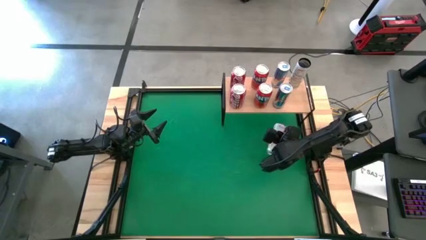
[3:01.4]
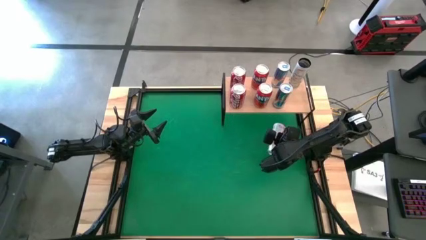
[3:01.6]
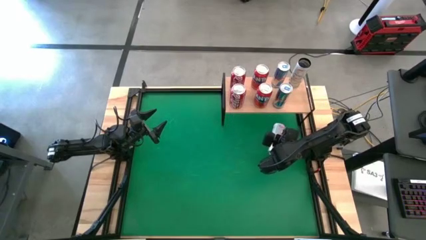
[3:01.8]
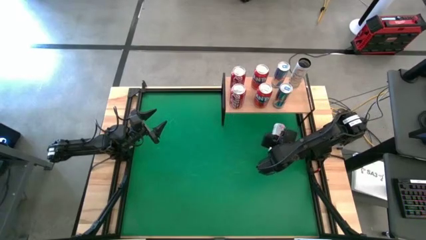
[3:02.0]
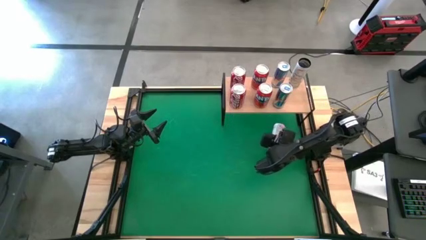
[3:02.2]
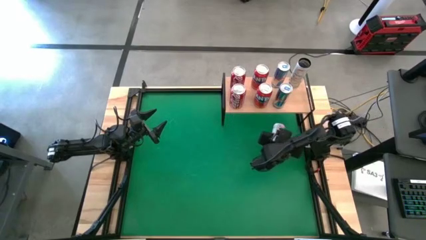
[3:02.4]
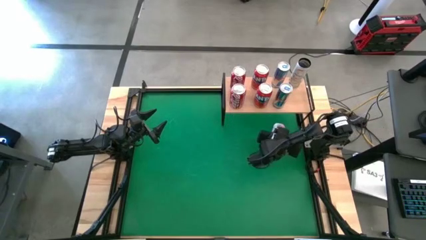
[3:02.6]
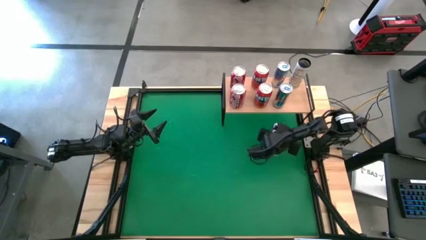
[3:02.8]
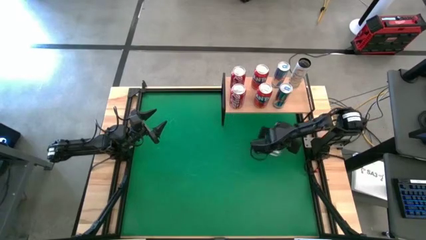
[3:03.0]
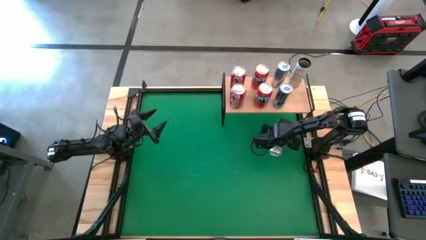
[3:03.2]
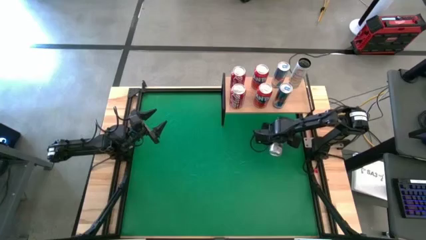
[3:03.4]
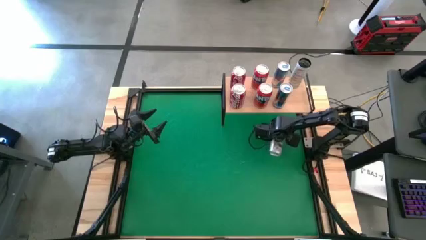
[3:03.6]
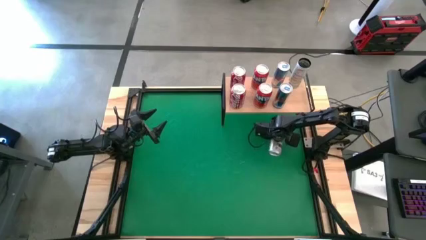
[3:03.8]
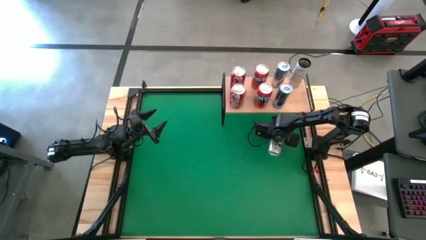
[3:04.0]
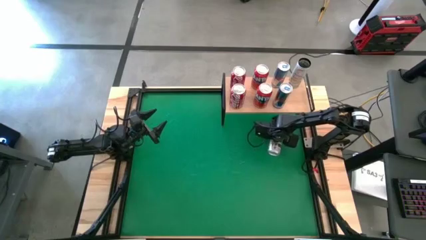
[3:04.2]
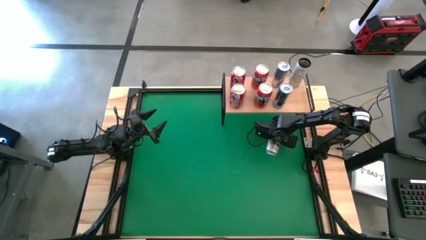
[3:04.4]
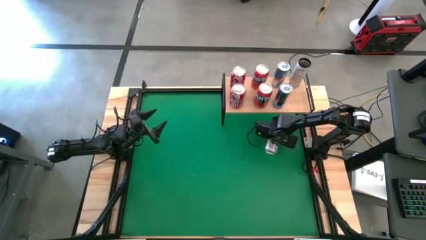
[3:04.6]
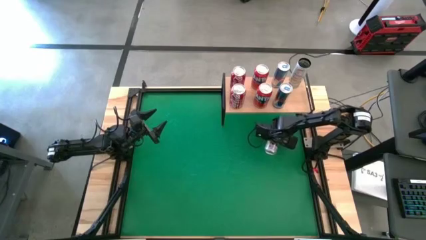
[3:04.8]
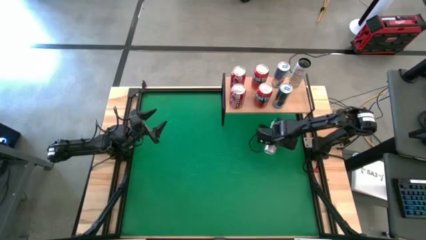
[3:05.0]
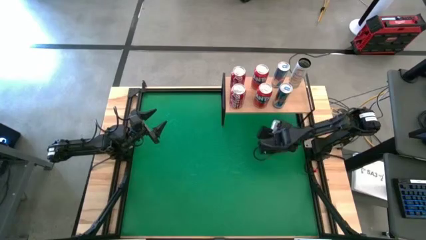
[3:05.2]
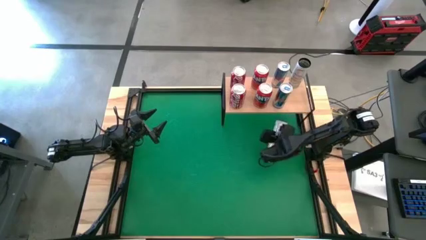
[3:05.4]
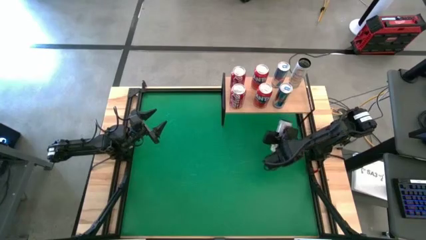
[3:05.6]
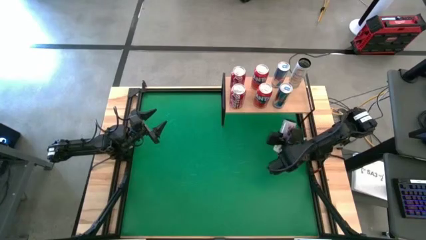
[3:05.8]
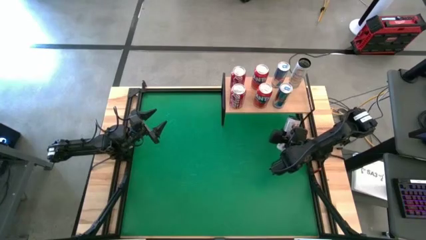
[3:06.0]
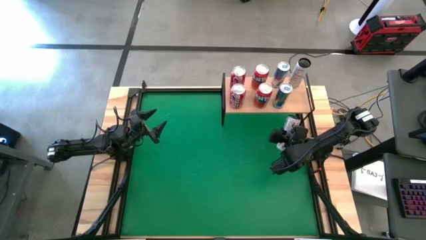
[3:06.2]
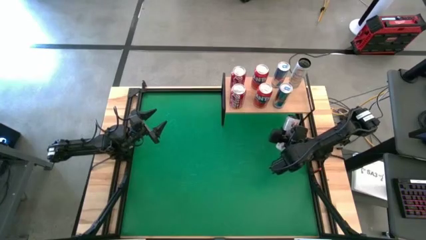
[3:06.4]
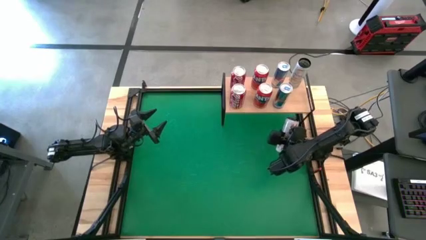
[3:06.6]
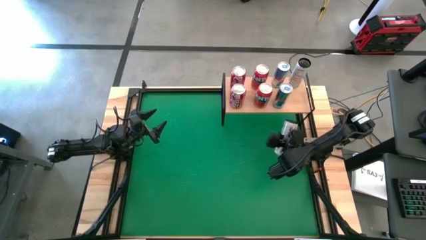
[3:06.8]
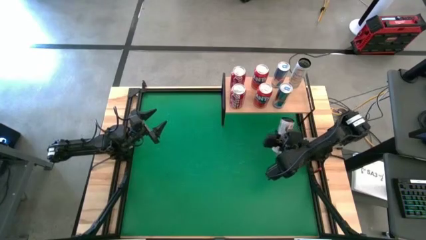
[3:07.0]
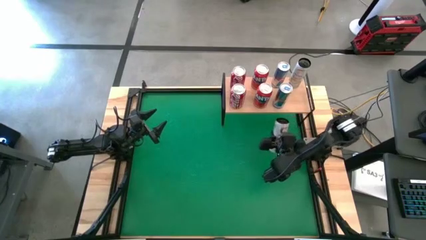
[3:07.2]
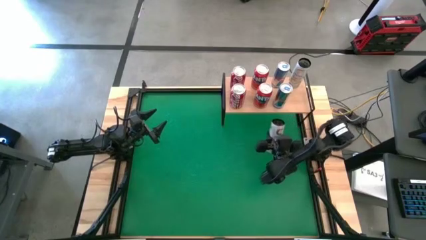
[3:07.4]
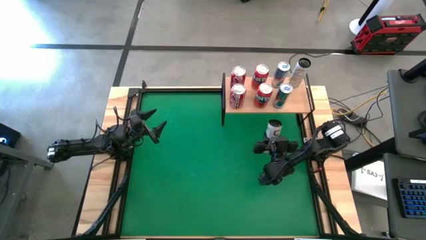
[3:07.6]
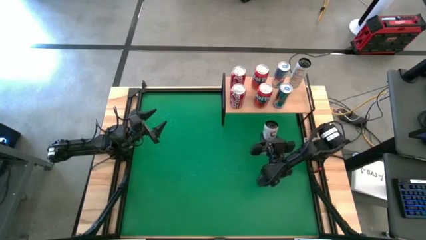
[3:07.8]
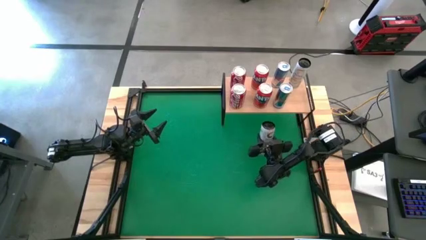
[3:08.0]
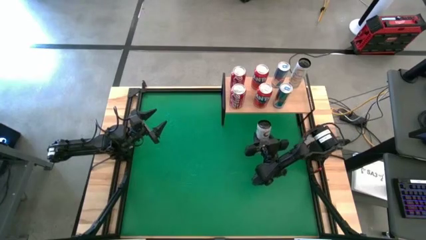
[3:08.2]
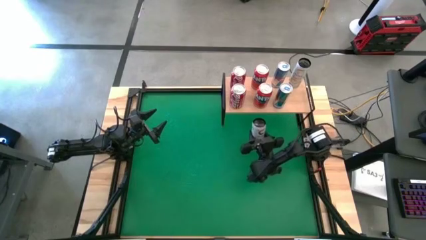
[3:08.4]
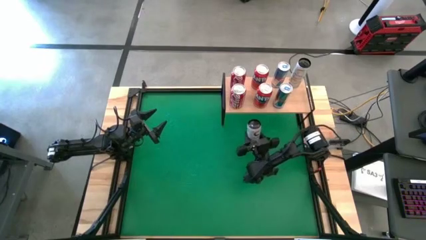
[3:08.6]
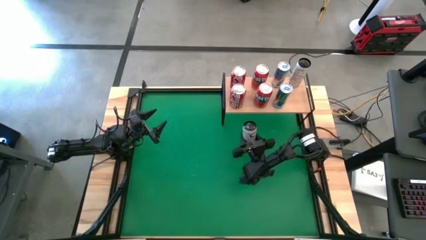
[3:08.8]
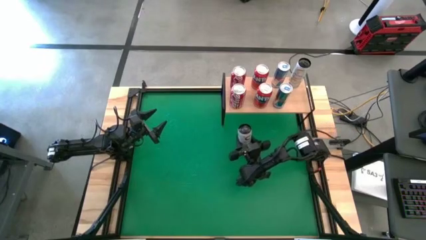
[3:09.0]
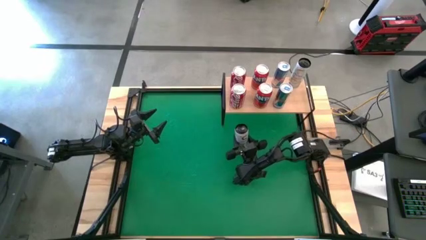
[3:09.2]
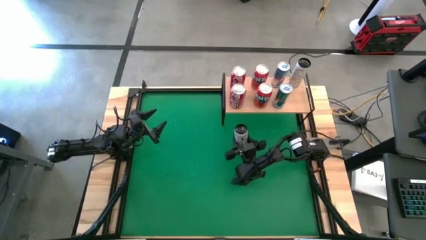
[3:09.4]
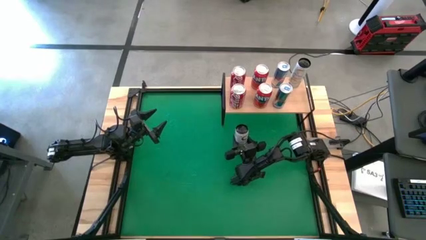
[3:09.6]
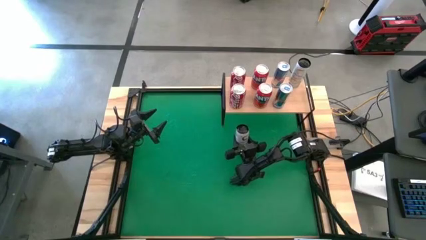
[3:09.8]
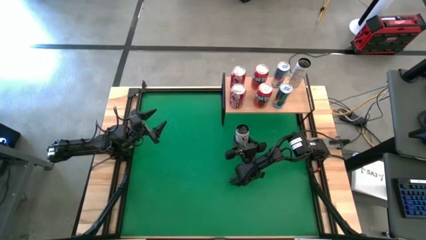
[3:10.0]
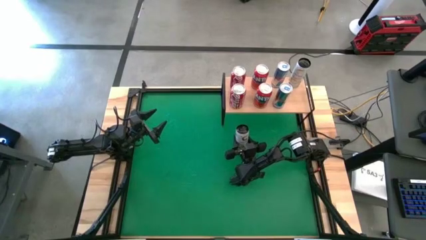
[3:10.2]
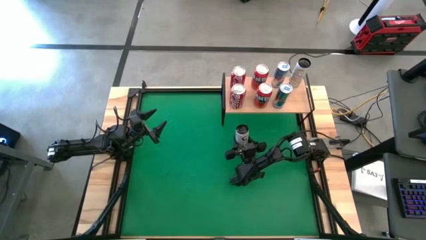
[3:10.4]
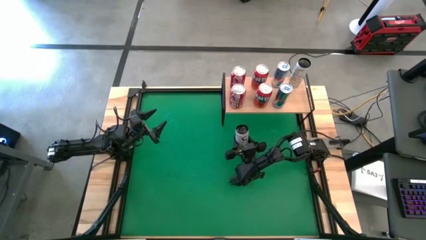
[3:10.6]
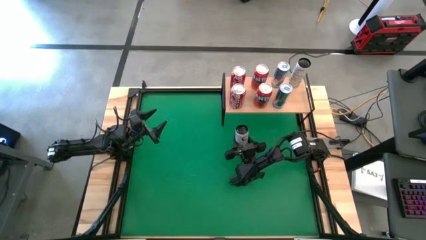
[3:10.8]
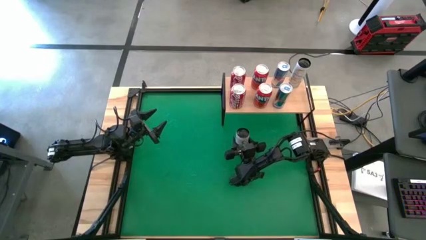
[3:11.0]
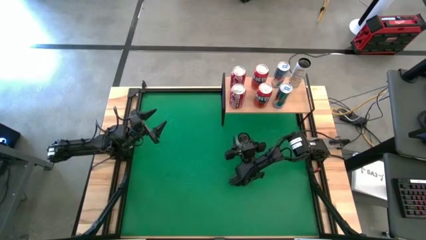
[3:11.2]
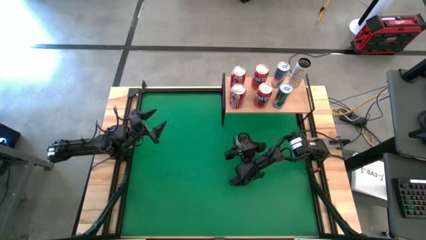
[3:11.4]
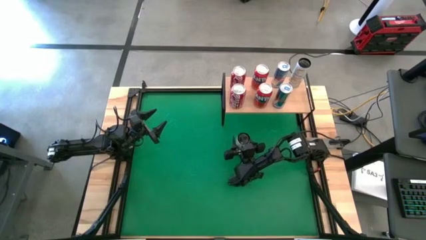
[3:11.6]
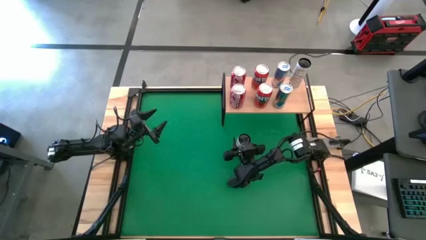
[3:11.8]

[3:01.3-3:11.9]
Task: Place canned beverage on shelf
Put the white yellow soda can on the shelf aligned with the other white yellow soda can

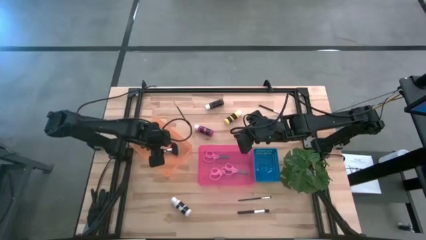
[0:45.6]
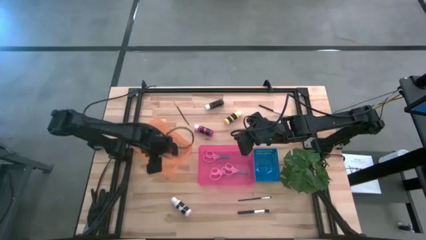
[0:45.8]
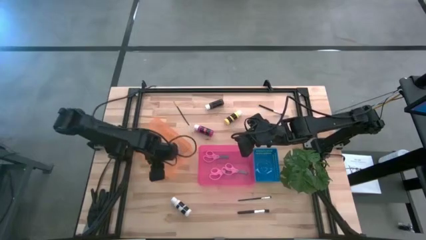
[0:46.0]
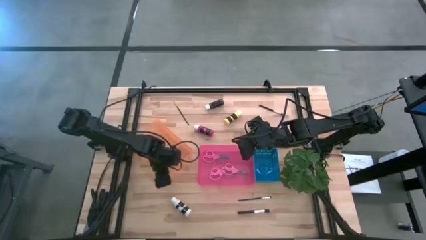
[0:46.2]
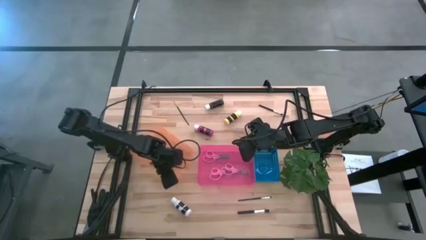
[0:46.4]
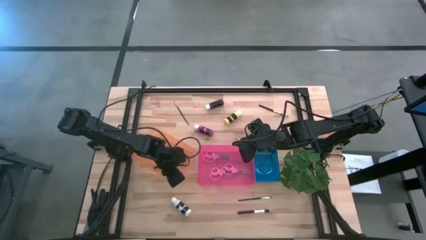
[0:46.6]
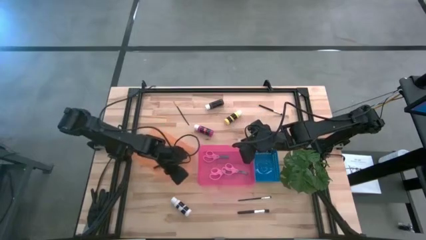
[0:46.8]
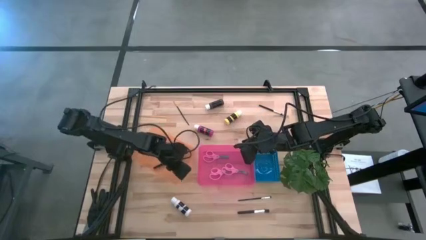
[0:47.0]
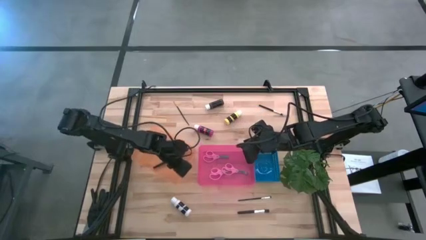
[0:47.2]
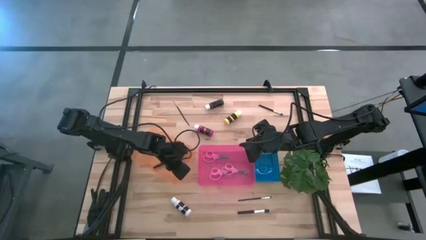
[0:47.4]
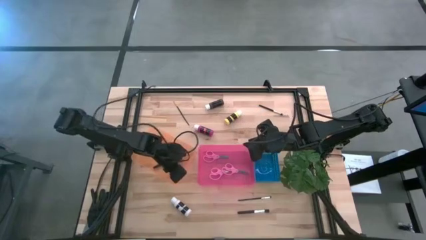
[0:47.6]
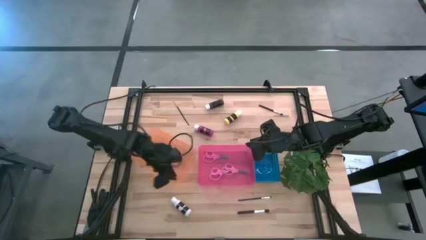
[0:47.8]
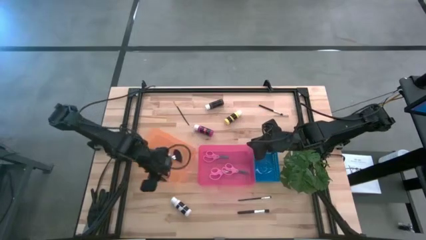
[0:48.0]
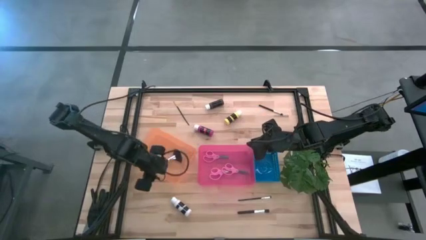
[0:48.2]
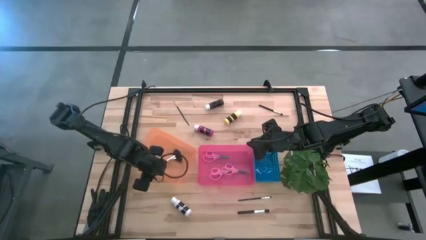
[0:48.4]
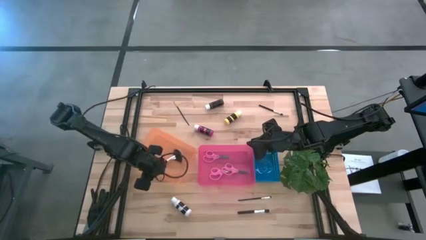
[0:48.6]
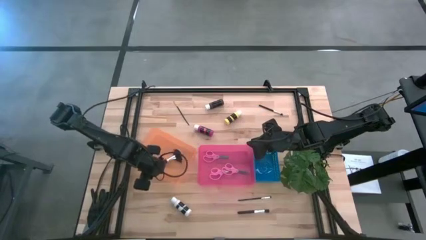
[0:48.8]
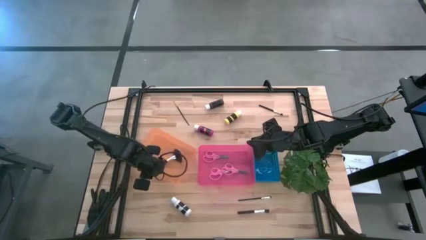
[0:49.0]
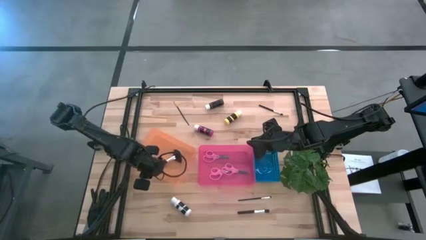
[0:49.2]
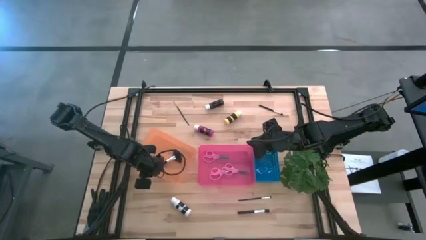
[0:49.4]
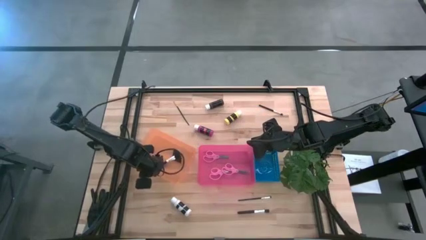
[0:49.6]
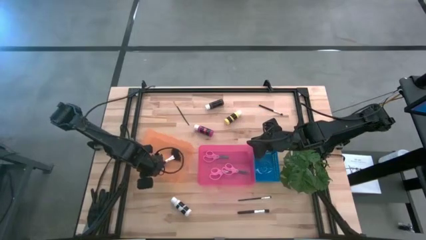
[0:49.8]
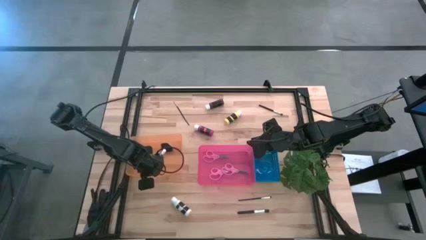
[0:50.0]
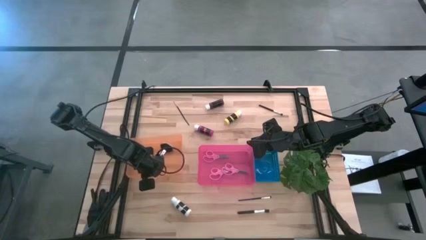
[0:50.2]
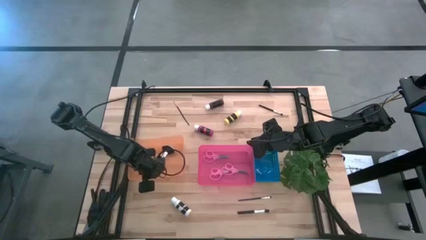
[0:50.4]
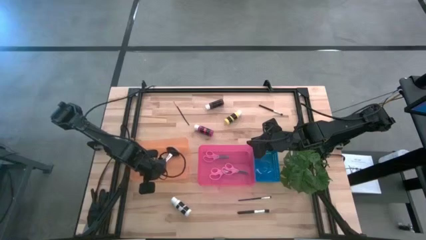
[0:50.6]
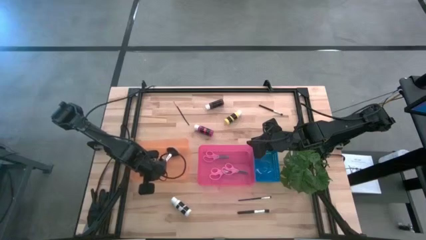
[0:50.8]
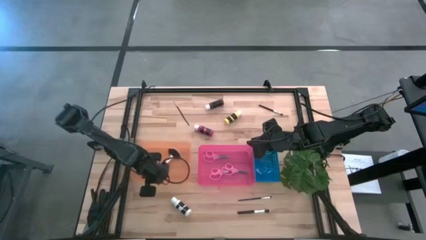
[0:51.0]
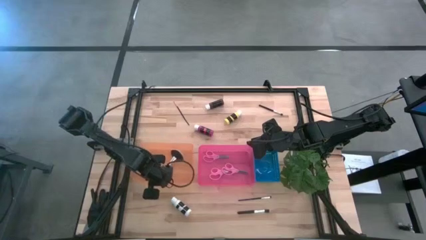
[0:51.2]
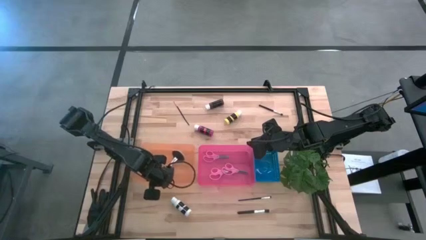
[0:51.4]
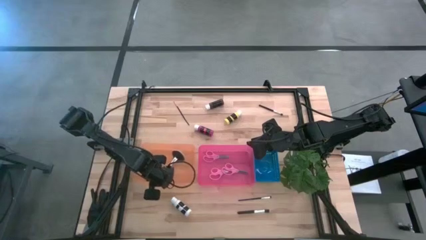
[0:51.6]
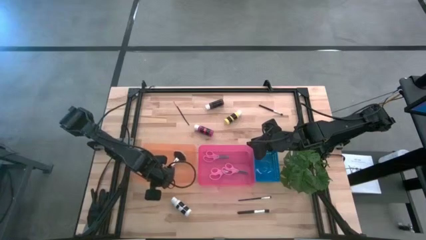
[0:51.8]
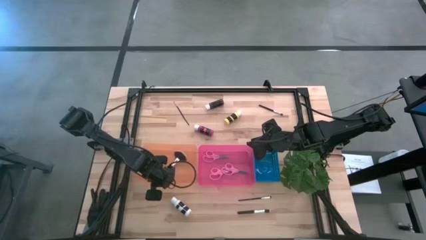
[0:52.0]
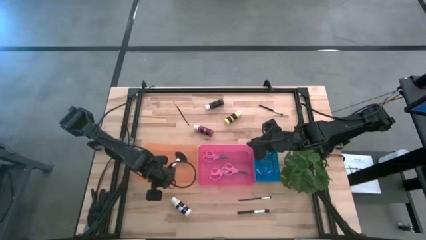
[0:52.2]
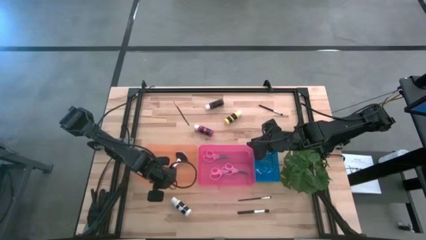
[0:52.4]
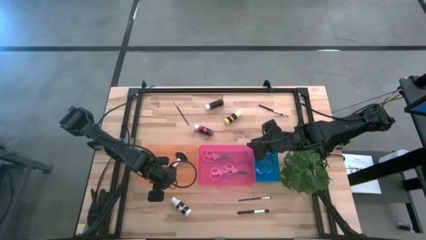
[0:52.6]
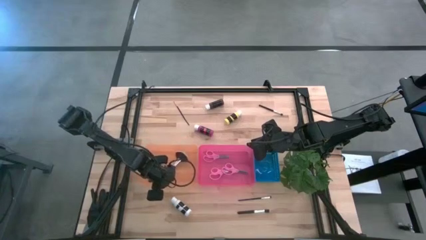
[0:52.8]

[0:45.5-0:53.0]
Task: Pick & Place Paint Supplies
Adjust the orange bin
